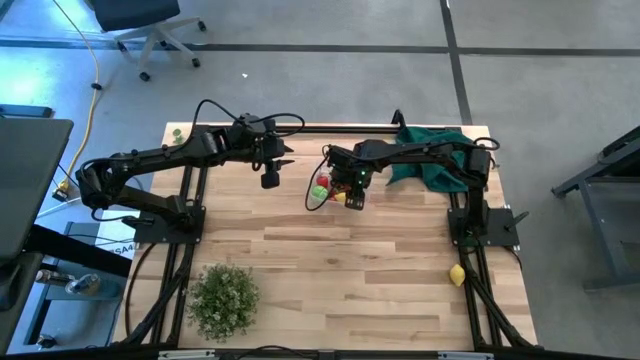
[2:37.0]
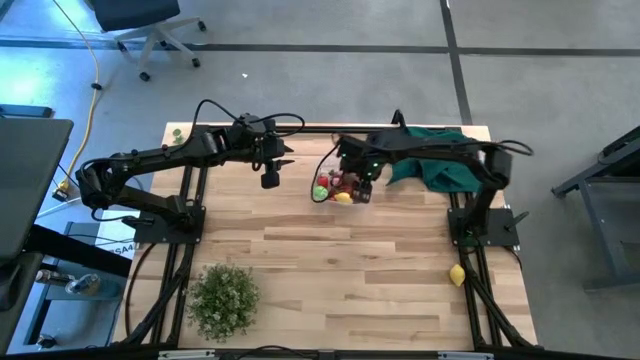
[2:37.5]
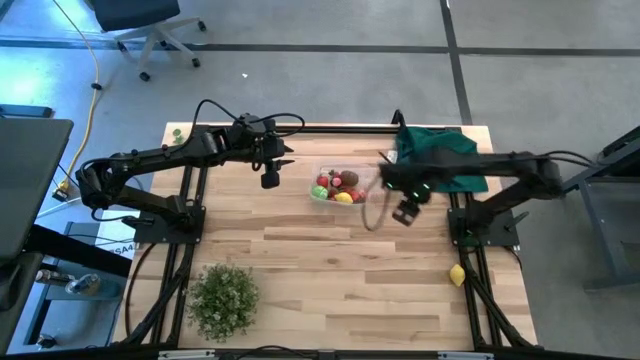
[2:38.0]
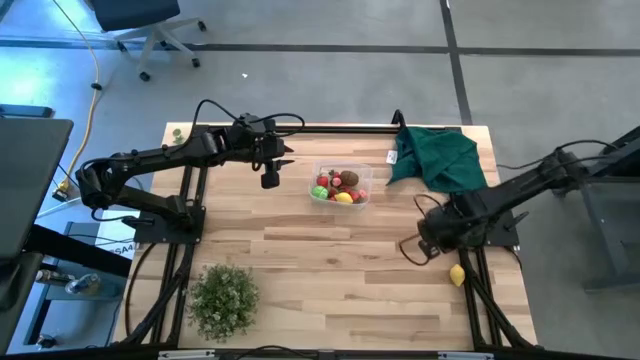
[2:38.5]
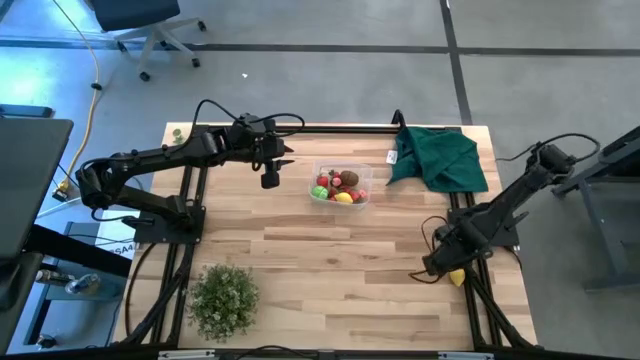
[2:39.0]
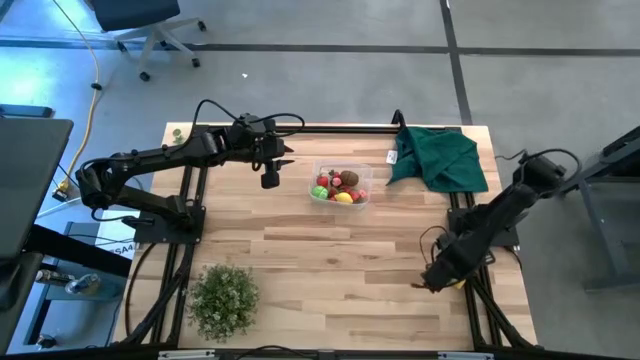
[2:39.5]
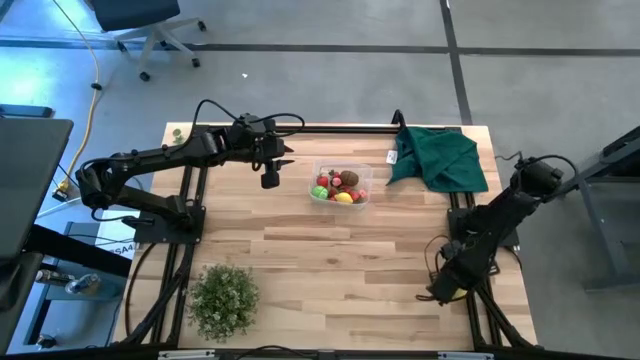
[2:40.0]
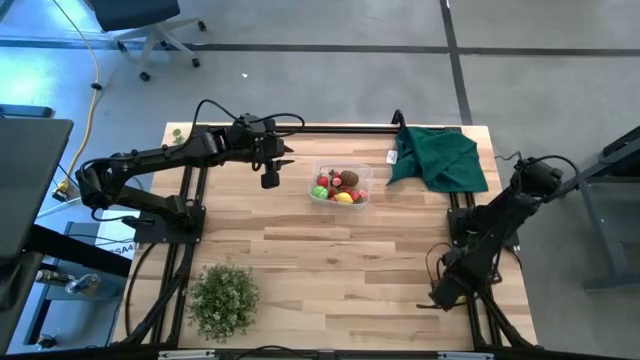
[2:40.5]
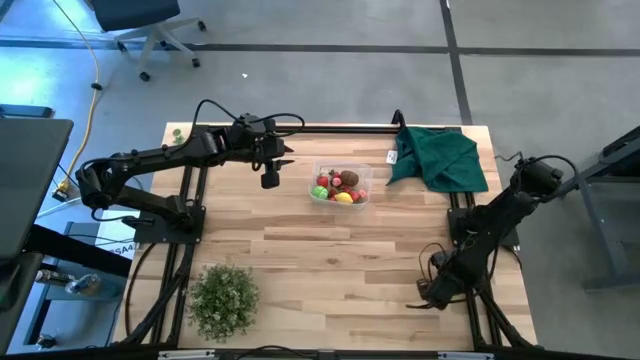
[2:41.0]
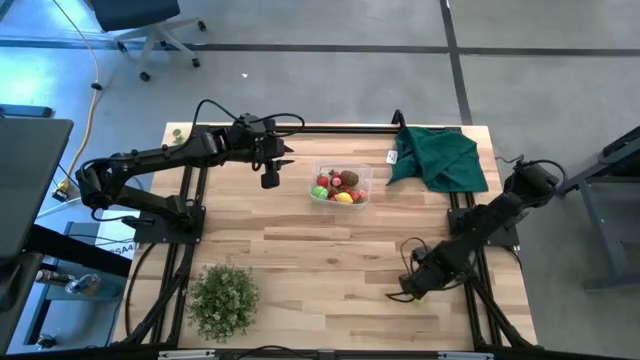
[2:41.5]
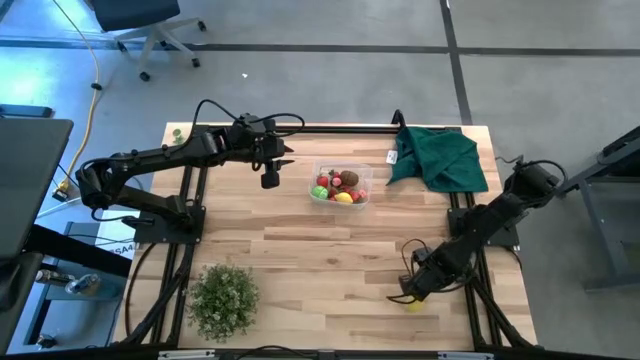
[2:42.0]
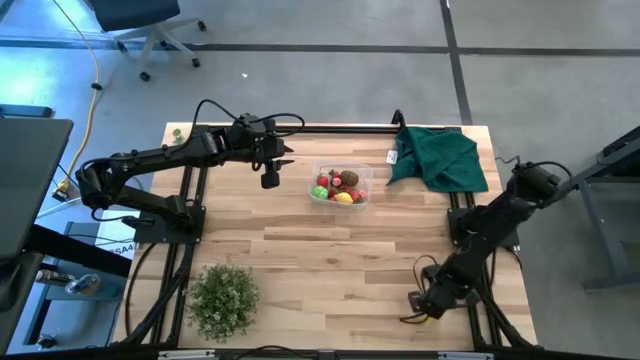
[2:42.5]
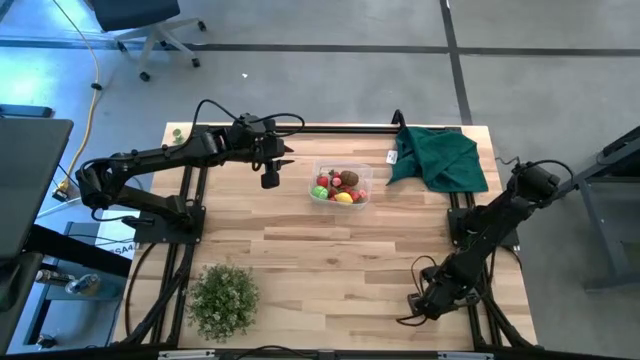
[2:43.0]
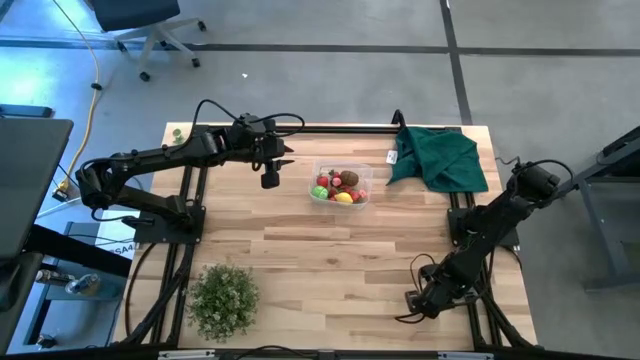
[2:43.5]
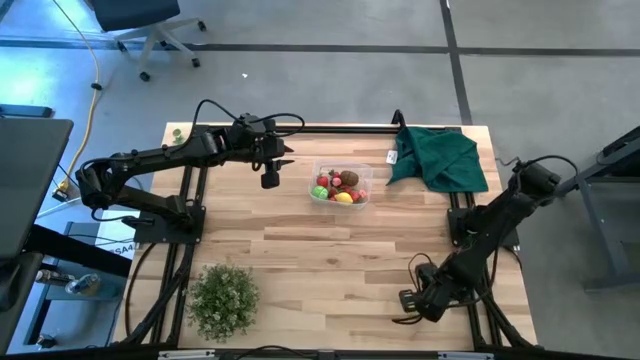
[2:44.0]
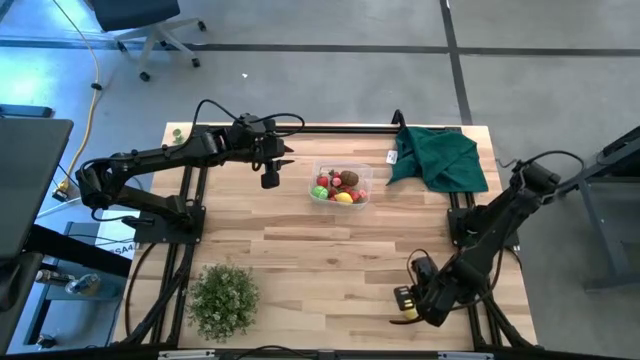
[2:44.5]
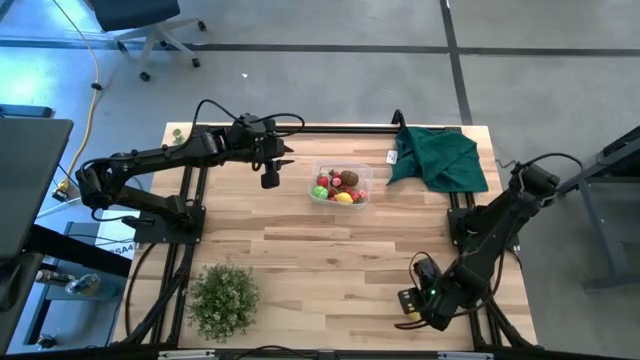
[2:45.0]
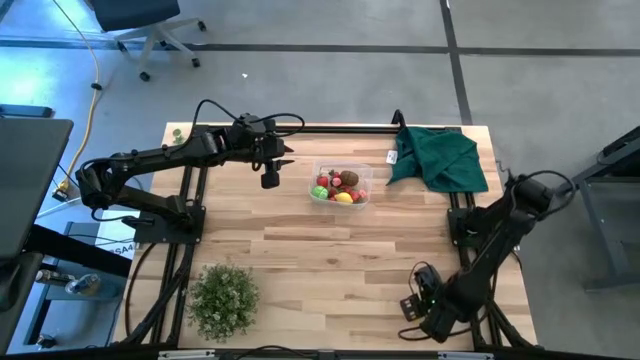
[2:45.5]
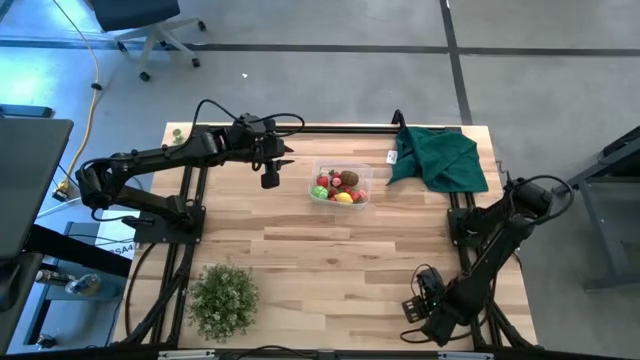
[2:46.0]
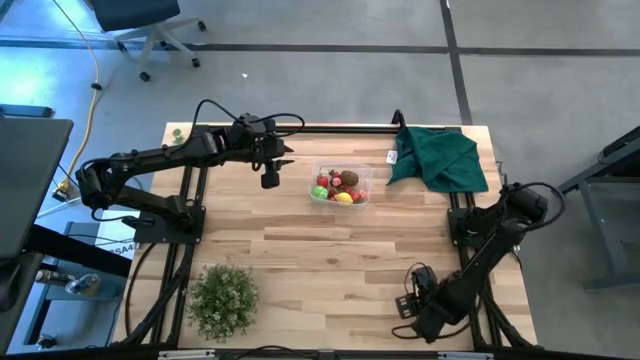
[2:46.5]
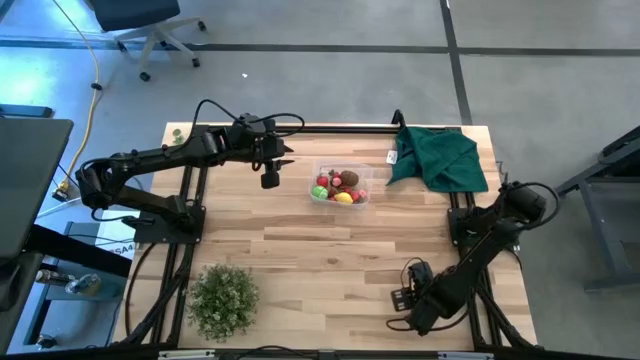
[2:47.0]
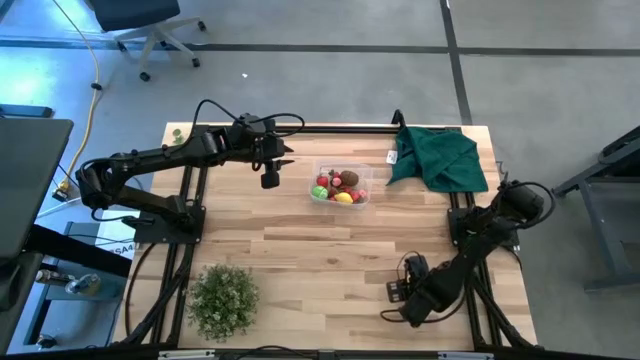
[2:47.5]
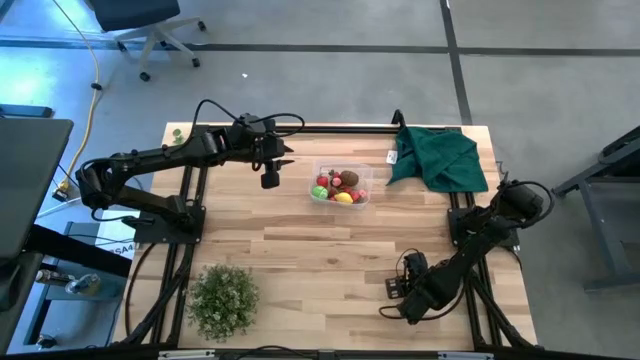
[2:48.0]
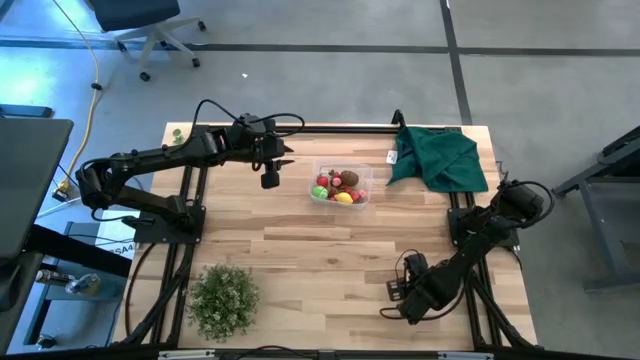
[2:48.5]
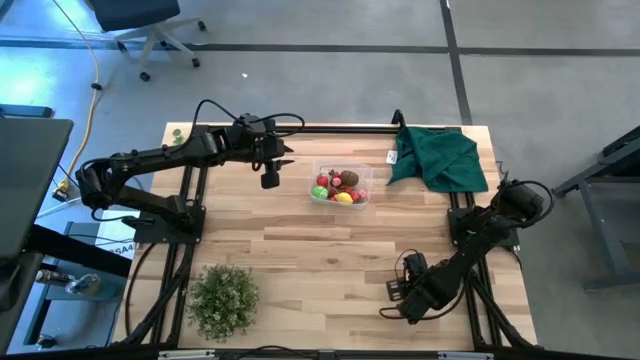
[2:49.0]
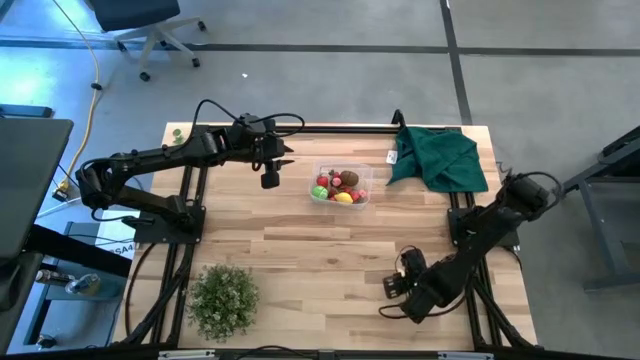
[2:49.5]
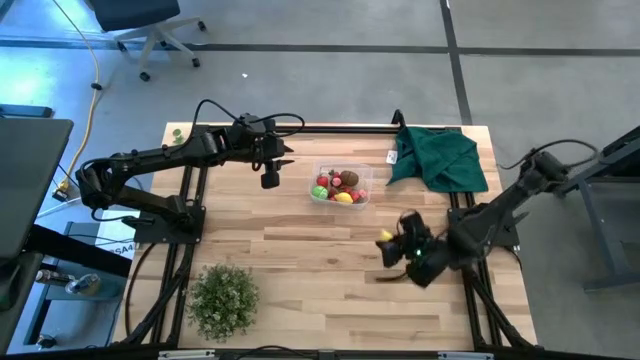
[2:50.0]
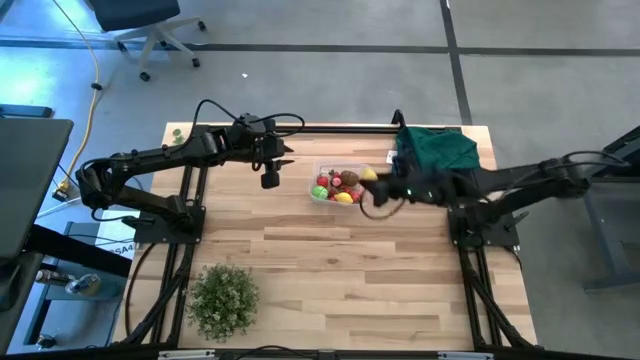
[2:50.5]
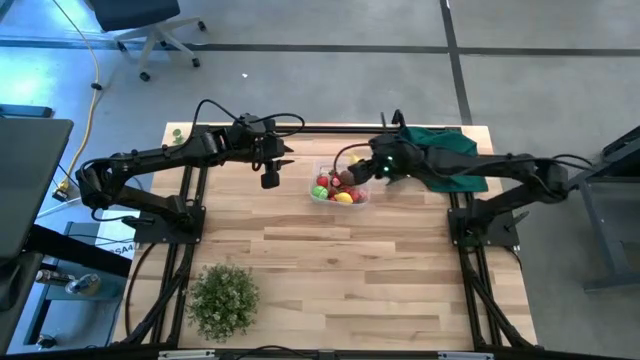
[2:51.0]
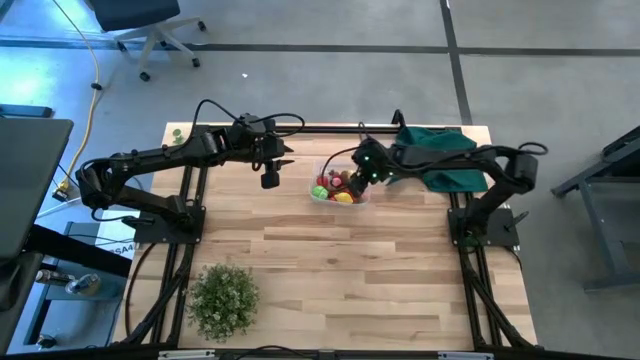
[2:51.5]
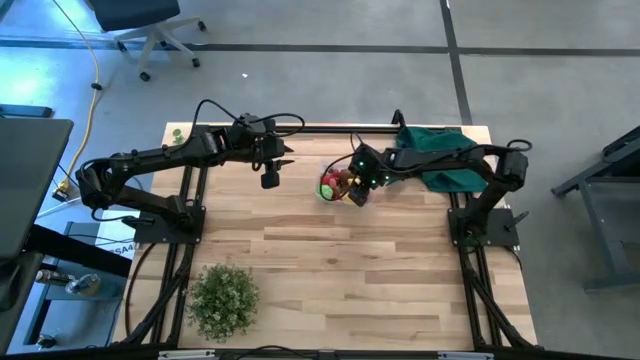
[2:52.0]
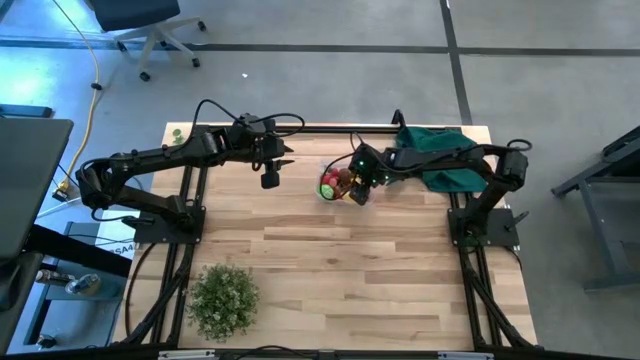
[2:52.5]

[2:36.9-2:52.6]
Task: Pick and placing Produce into tupperware
Put the yellow lemon into the transparent bin

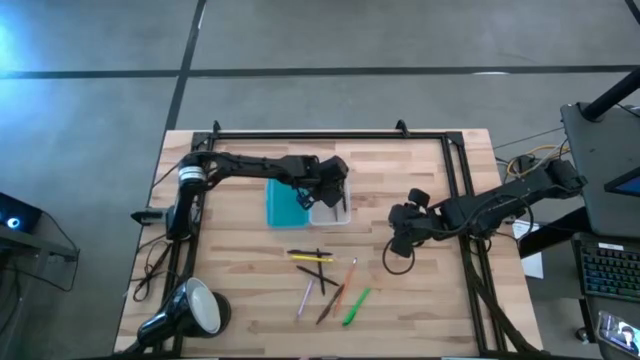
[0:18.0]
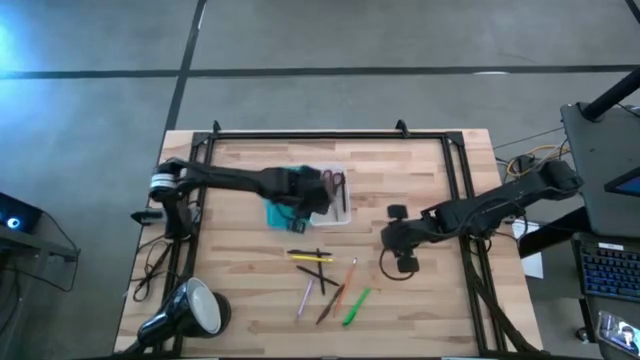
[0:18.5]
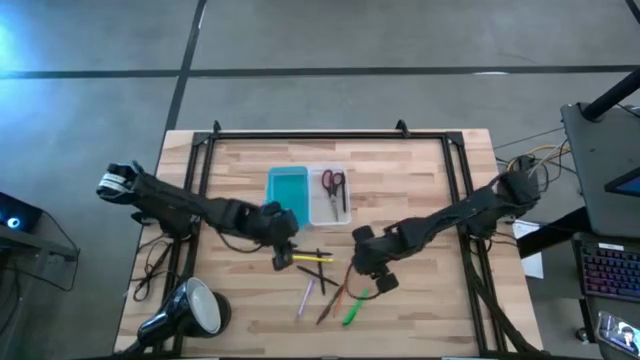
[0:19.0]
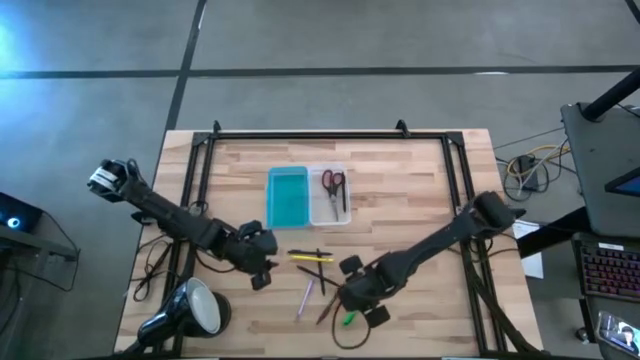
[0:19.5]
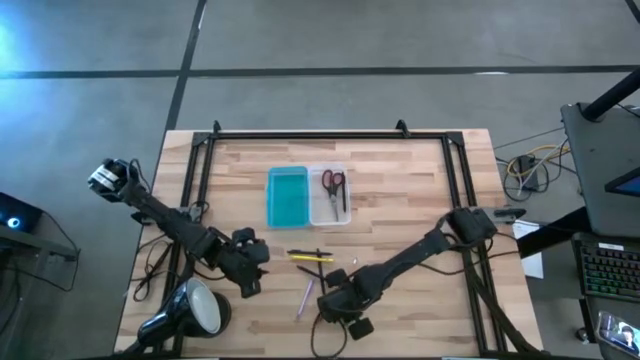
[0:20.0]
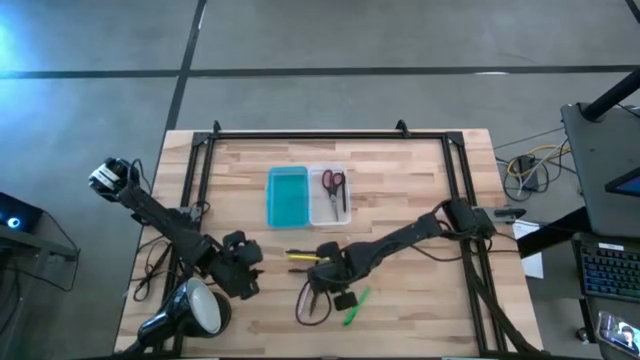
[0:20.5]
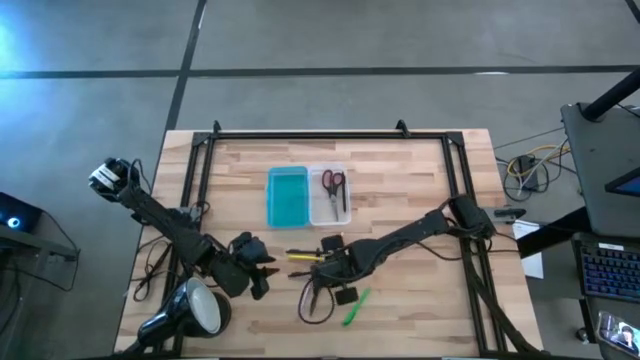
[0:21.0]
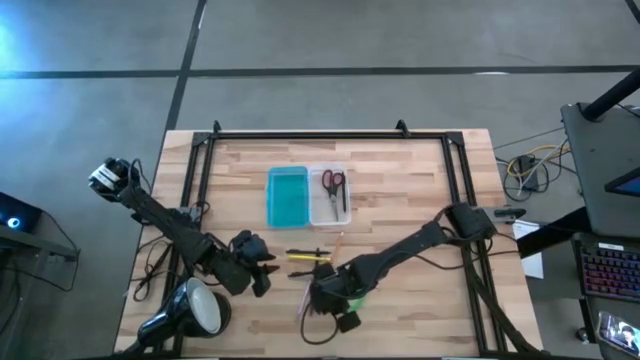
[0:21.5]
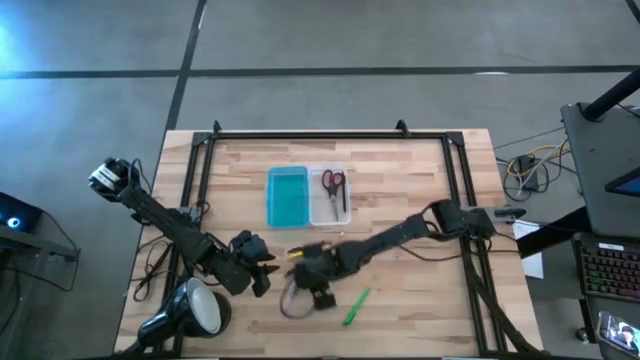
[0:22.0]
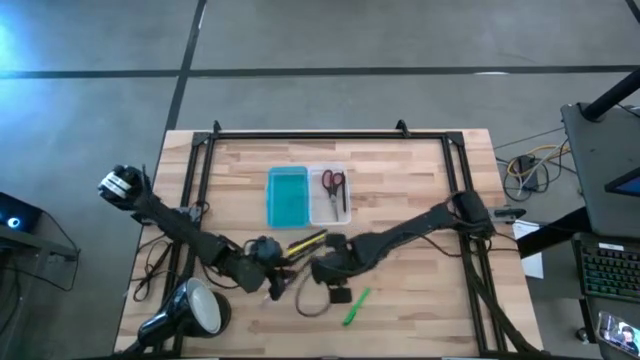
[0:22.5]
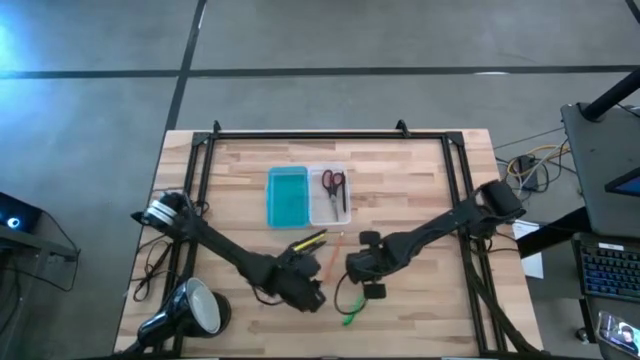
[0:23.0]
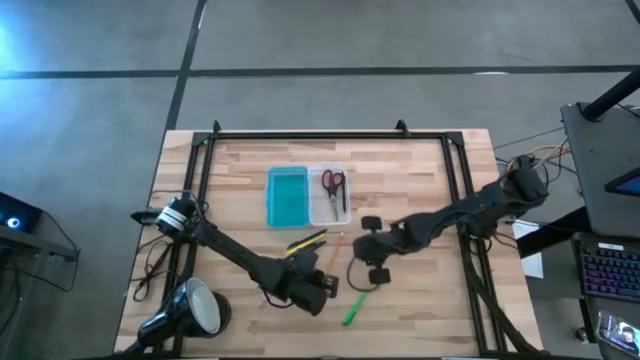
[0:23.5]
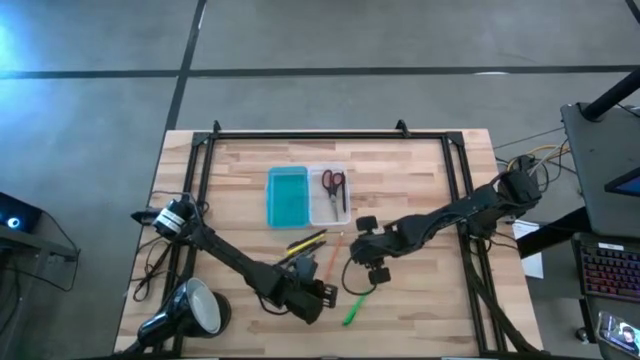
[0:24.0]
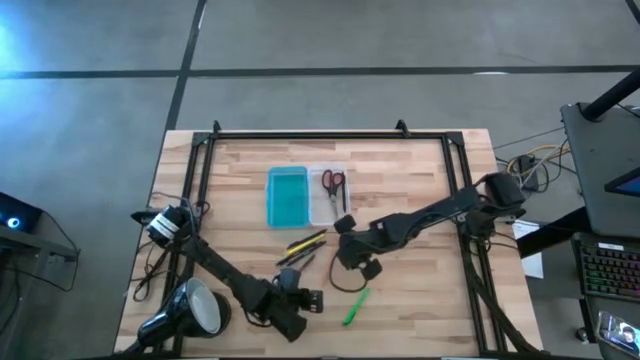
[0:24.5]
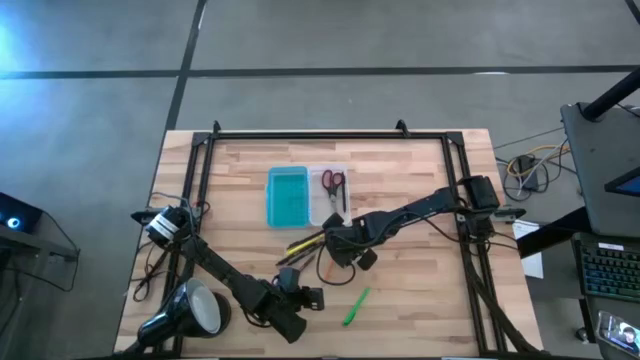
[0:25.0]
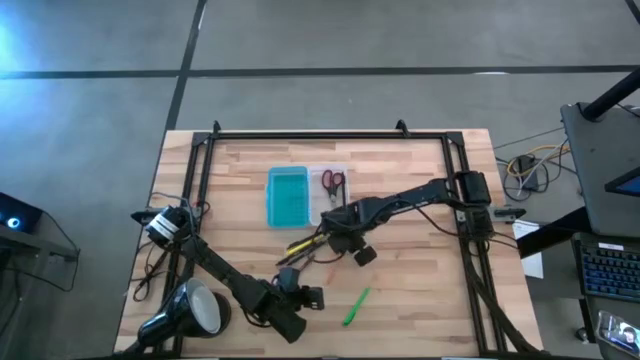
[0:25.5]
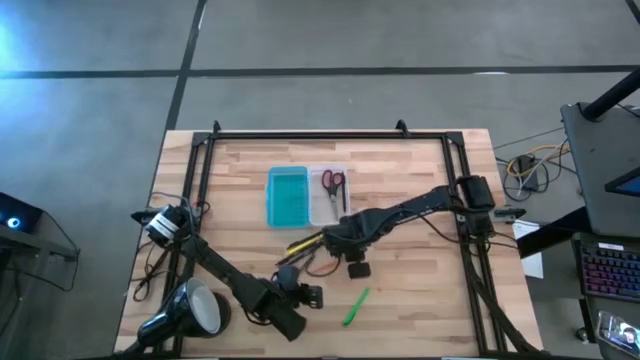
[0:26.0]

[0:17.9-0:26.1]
Task: Pick & place school supplies into a supply box
Put the orange pencil into the blue supply box
